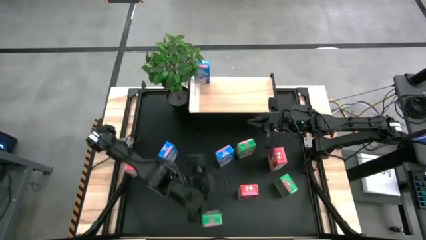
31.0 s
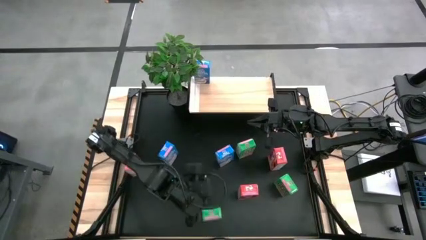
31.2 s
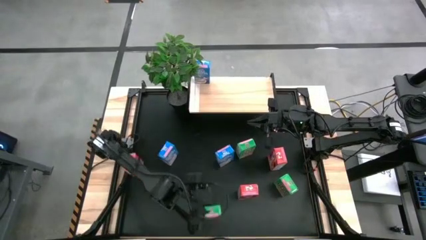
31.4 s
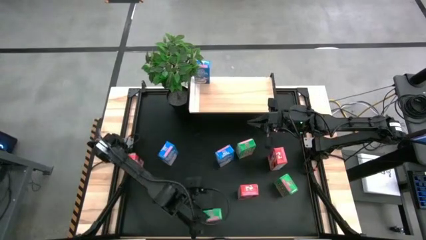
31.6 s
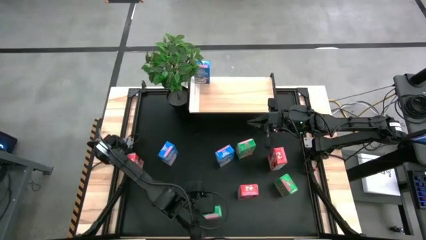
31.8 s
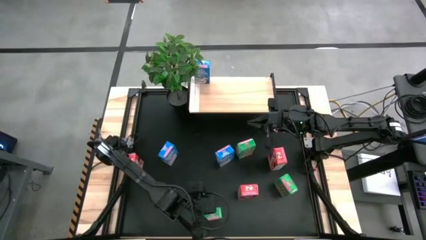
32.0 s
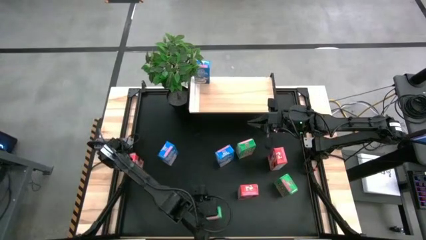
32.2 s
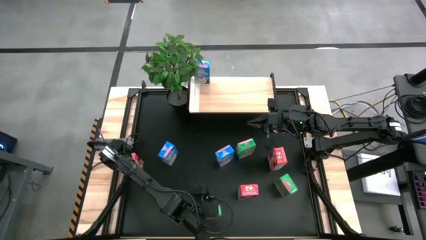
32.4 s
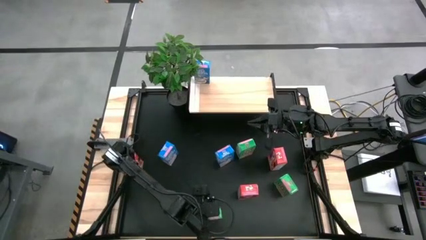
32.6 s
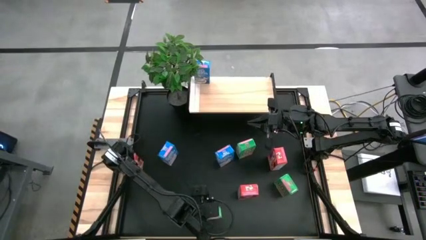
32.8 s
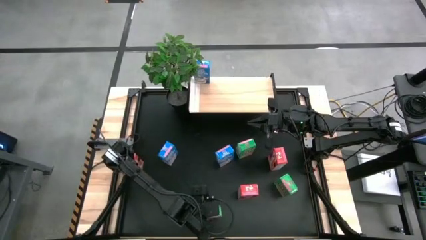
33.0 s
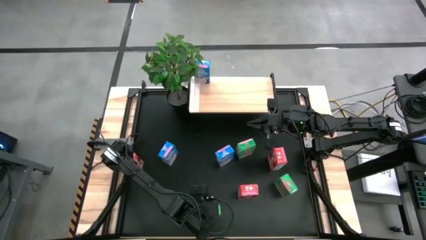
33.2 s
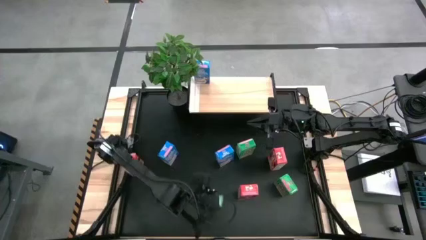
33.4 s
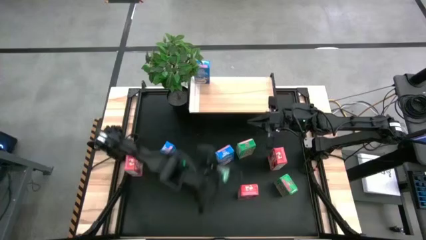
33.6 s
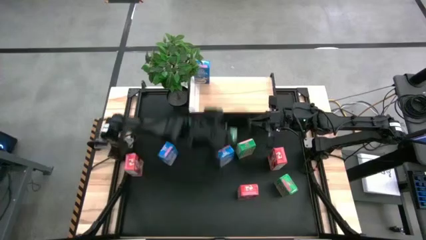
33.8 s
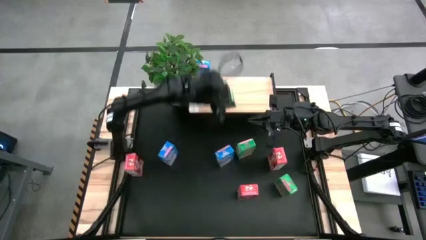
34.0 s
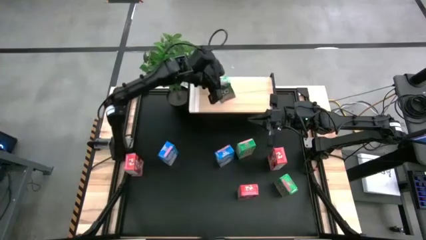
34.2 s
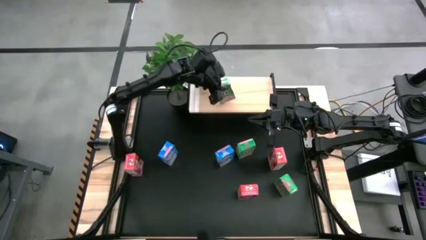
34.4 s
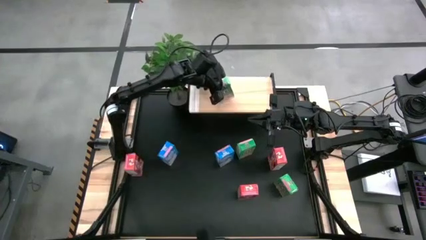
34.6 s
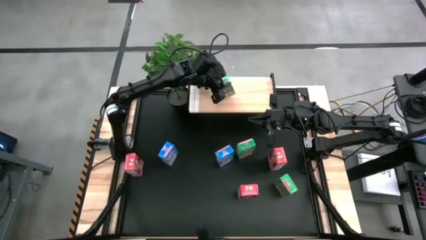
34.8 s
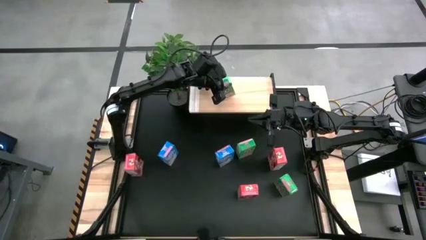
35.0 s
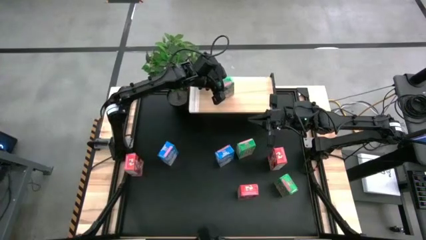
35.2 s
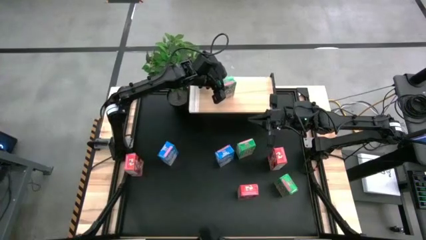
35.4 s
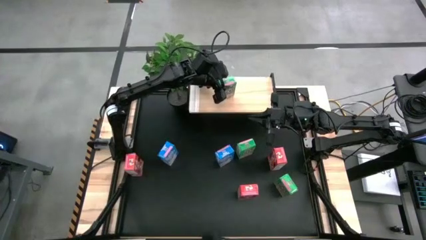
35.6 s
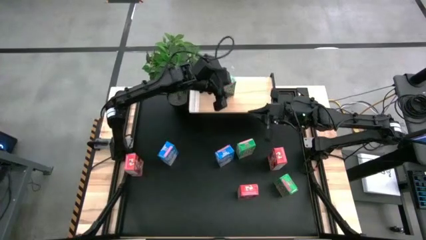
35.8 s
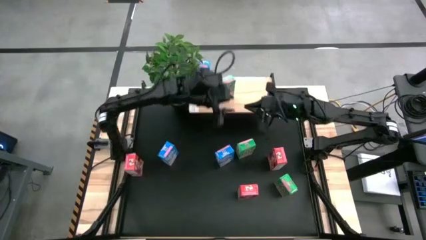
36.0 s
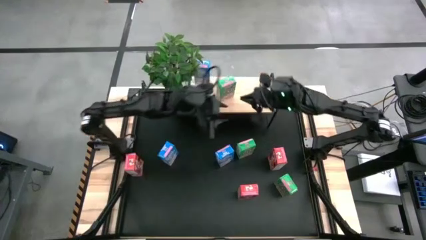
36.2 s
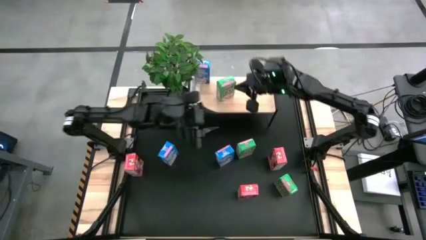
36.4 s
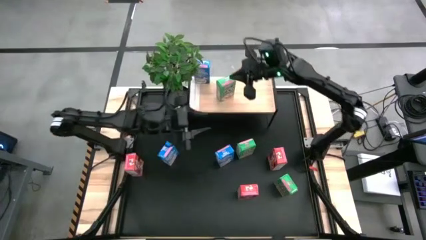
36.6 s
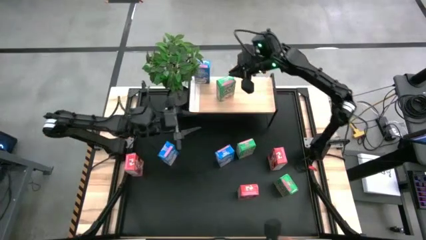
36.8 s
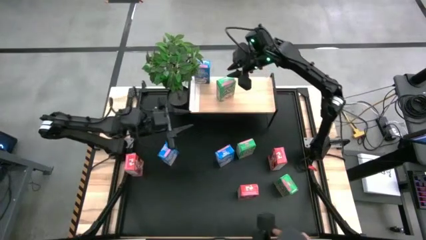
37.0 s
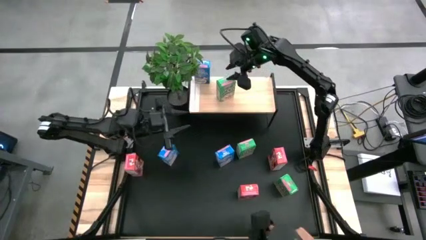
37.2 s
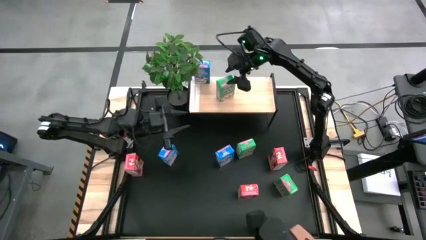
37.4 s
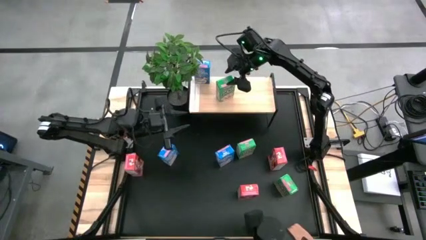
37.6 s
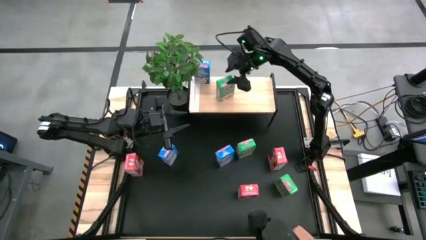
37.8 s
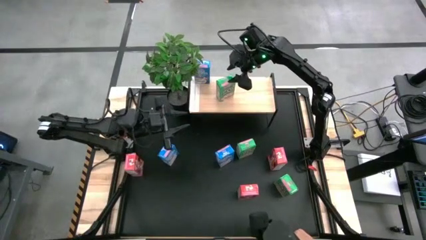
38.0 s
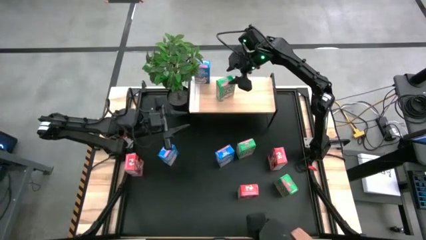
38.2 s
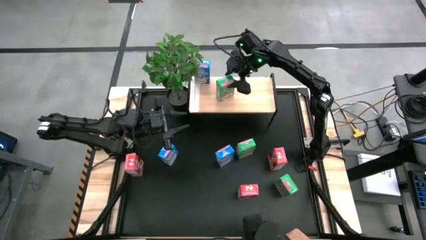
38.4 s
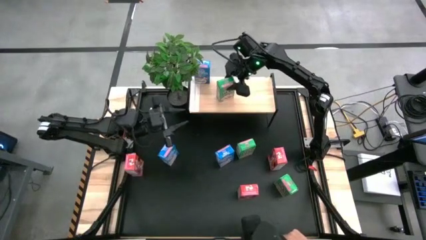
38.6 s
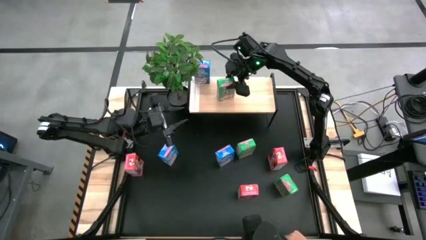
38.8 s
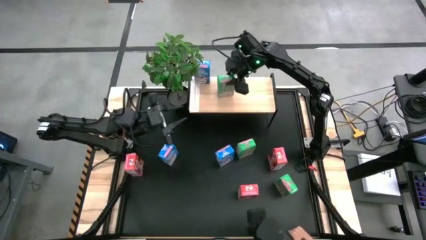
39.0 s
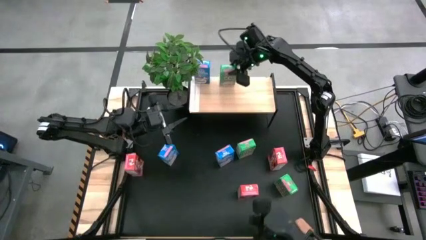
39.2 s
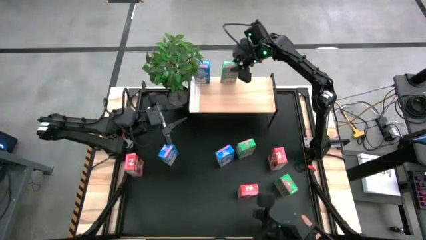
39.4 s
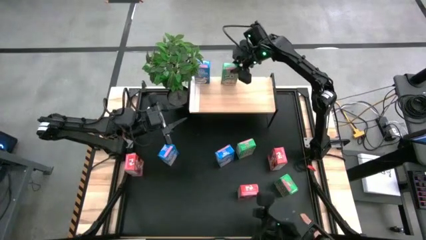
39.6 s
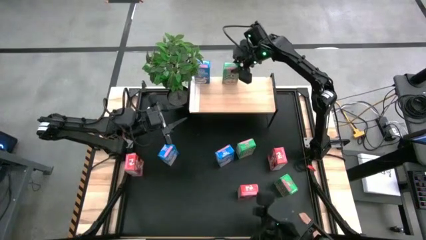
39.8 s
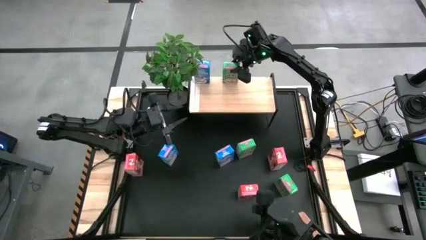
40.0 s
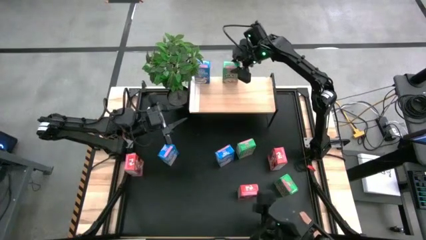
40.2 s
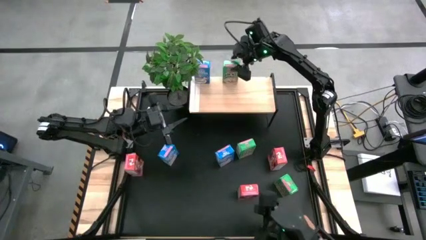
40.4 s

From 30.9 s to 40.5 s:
Task: Stack cereal on shelf
Put the bottom green cereal box on the shelf

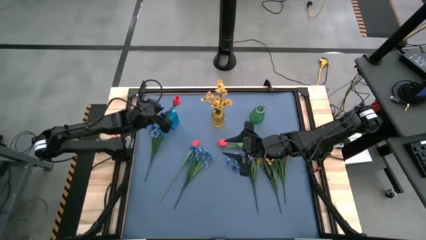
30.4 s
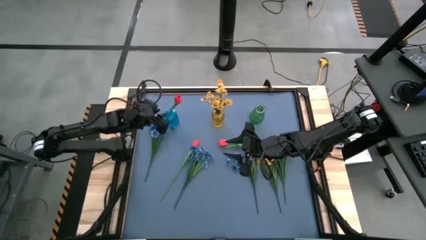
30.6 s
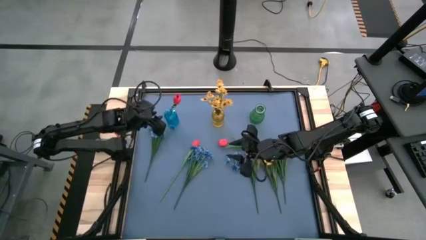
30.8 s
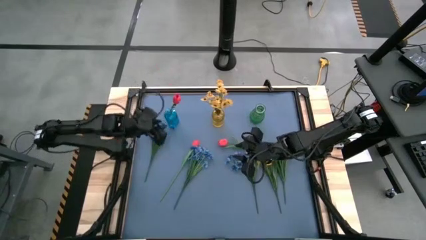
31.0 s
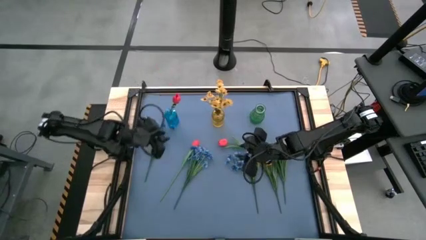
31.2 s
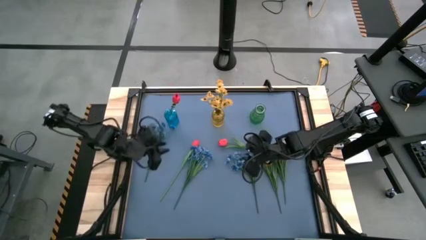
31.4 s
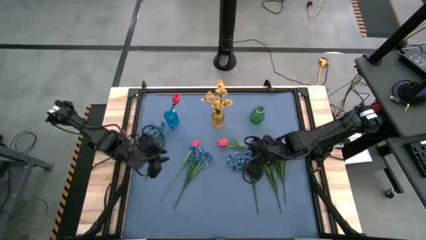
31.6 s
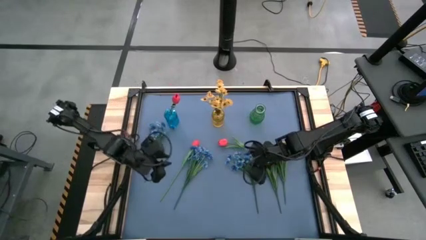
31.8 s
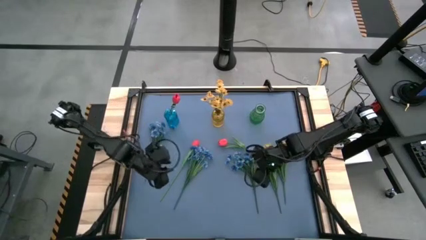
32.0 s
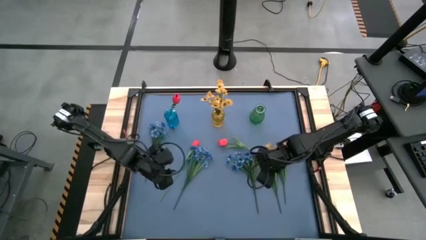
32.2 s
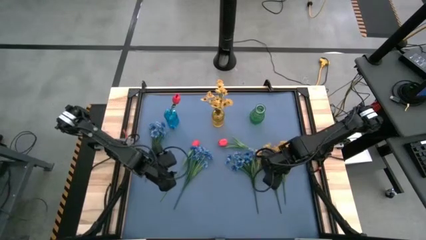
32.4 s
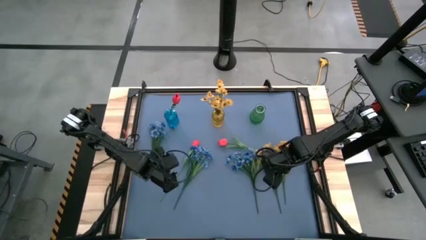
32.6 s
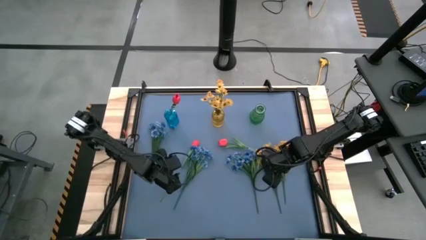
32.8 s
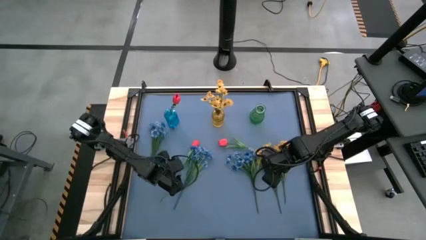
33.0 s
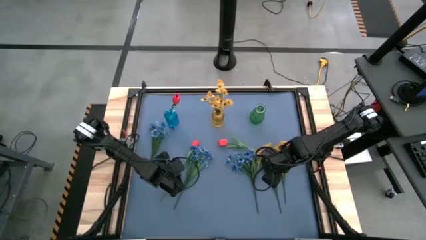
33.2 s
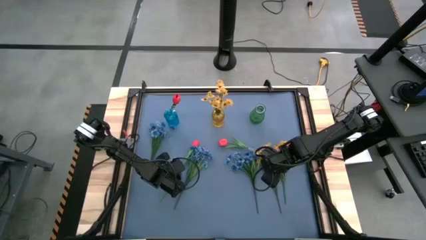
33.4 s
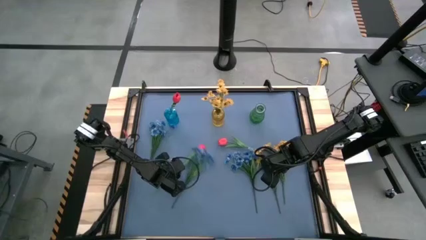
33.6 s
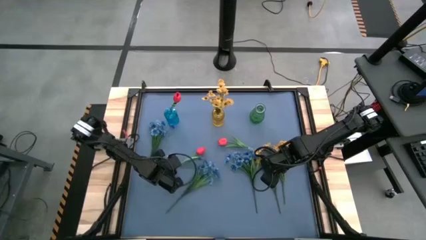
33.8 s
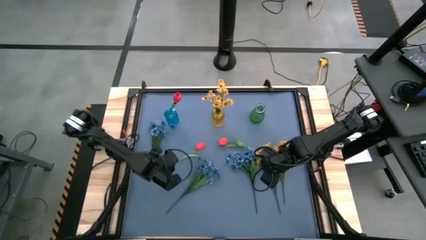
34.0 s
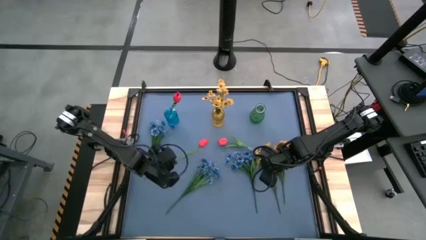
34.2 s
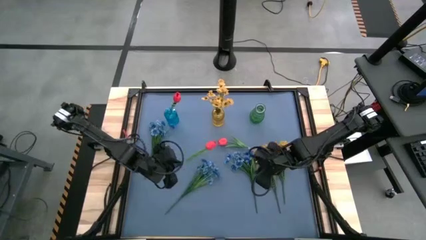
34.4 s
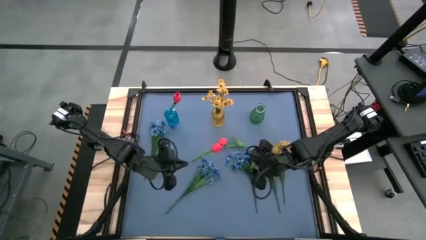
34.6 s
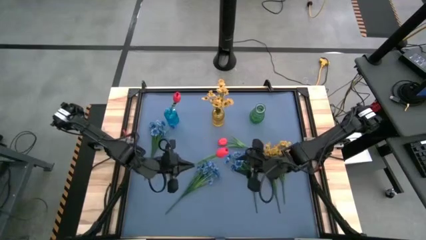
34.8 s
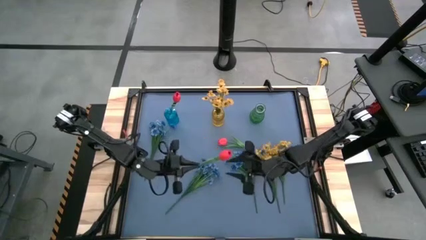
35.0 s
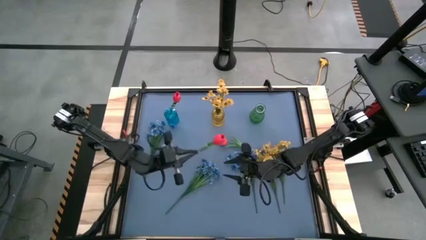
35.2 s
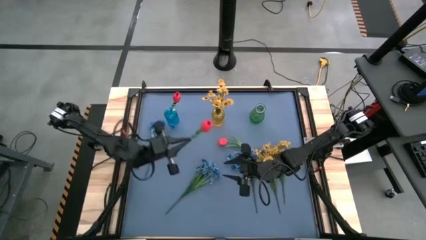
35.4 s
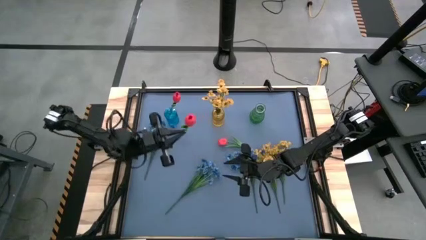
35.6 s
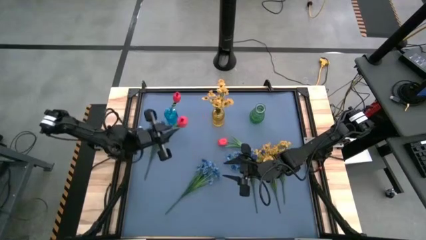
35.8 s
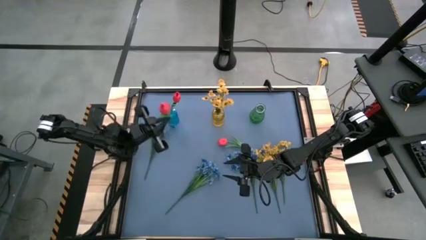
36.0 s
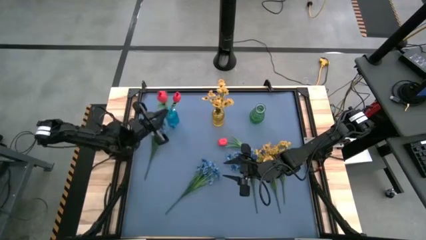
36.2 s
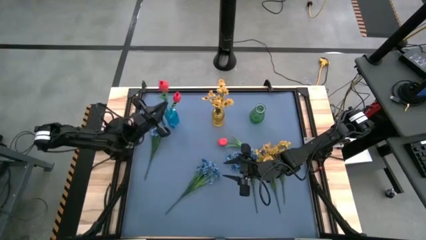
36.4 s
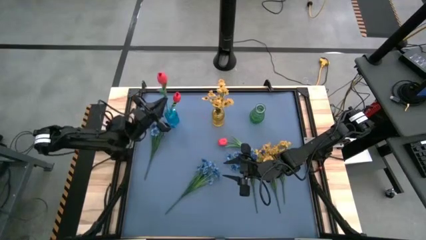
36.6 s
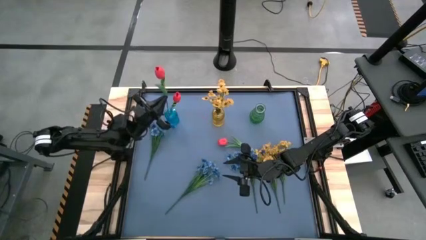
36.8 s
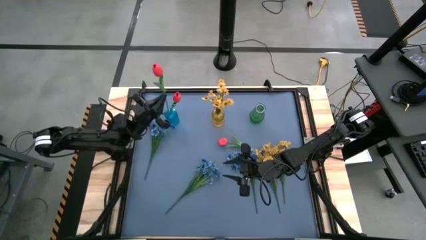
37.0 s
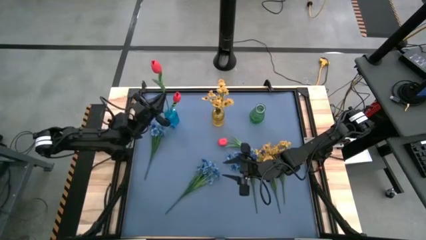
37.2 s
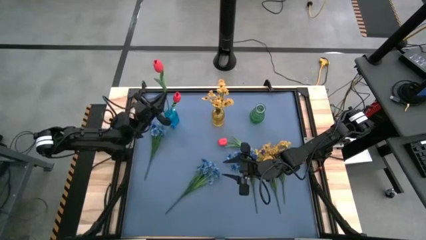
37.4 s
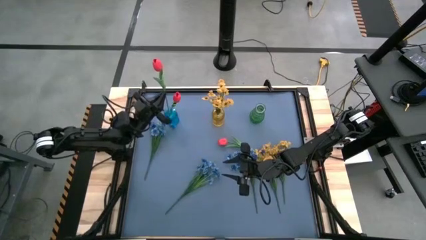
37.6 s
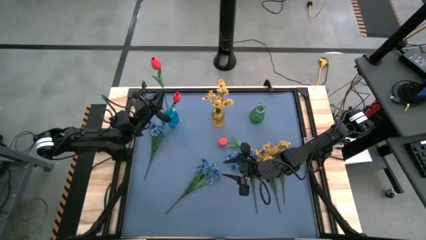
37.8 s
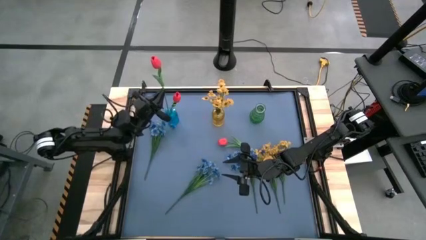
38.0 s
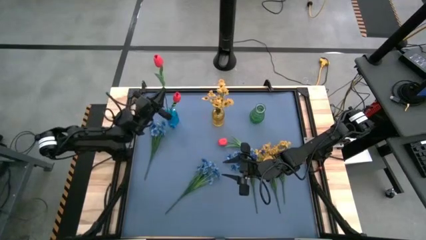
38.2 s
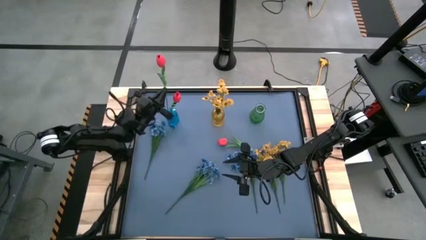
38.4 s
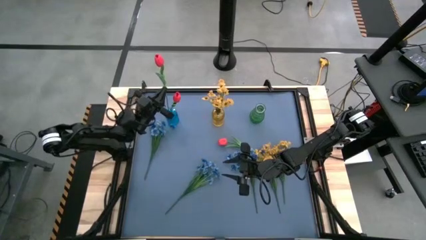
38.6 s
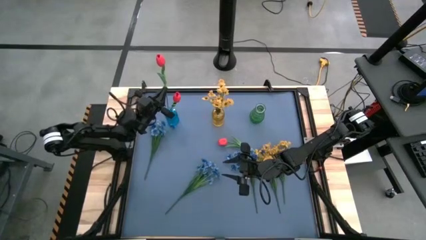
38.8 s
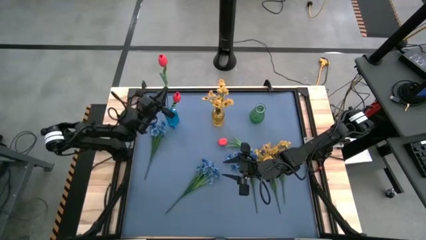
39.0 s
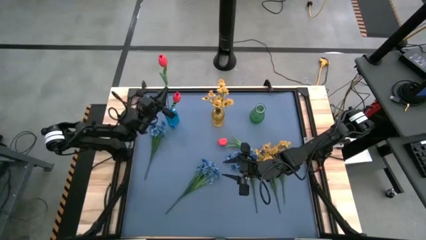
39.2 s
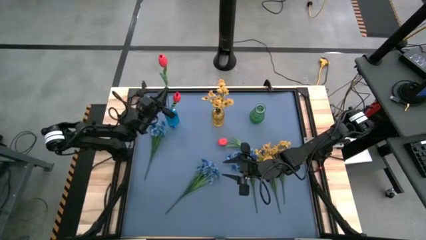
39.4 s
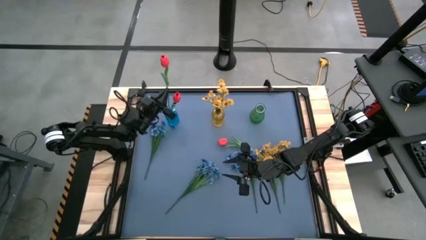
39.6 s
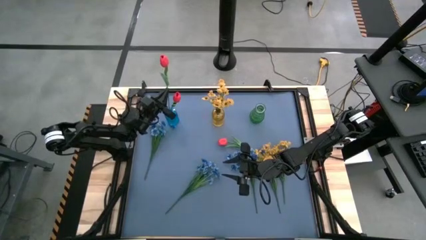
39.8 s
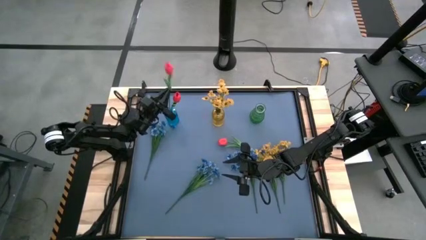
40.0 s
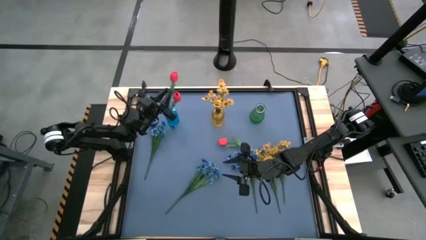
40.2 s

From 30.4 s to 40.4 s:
Task: Sort flowers into vase by color
Put the left red tulip into the blue vase
